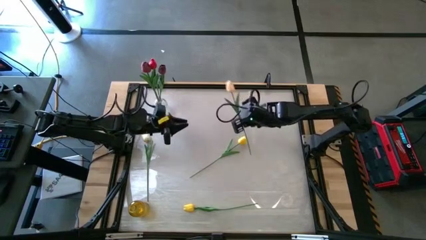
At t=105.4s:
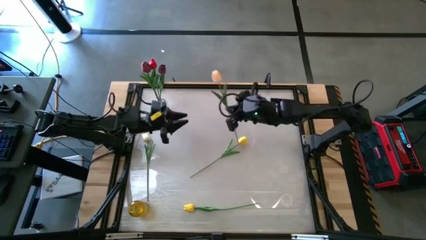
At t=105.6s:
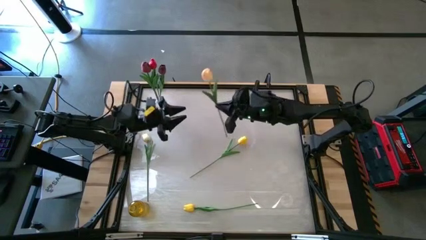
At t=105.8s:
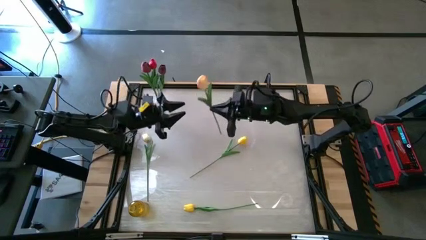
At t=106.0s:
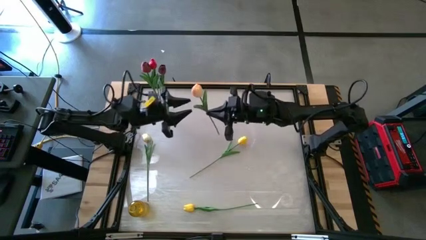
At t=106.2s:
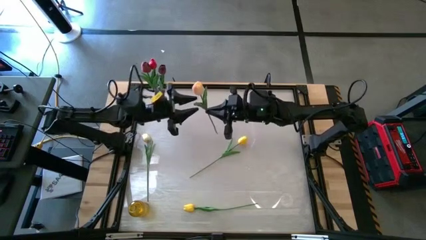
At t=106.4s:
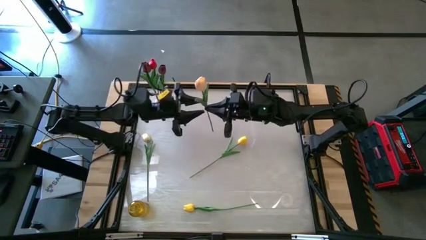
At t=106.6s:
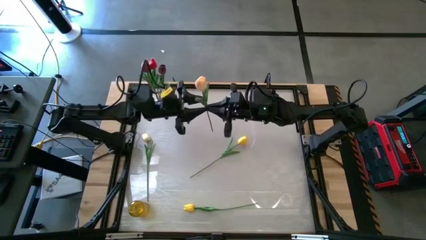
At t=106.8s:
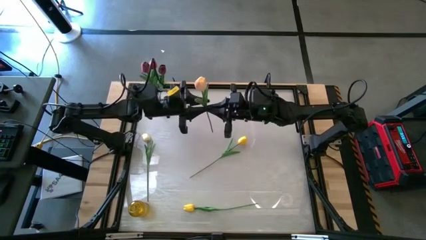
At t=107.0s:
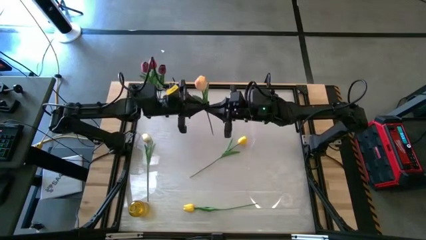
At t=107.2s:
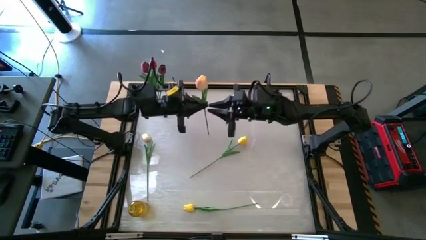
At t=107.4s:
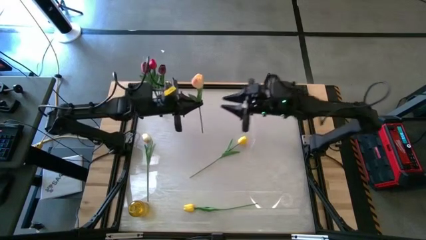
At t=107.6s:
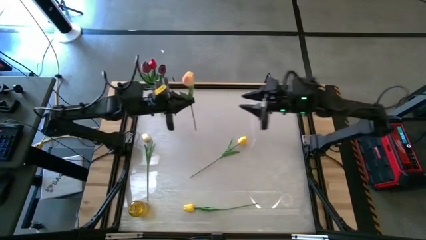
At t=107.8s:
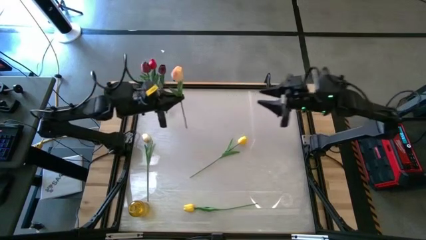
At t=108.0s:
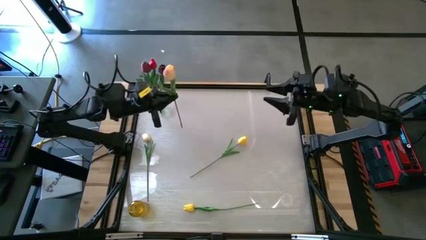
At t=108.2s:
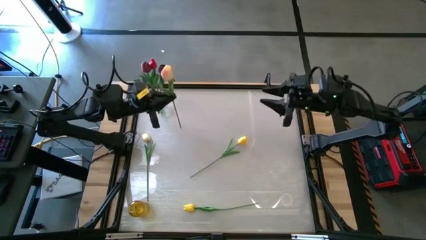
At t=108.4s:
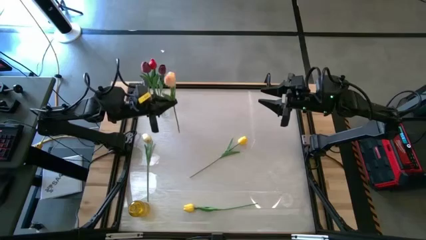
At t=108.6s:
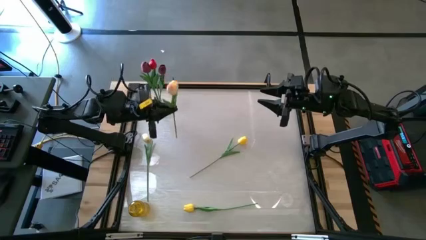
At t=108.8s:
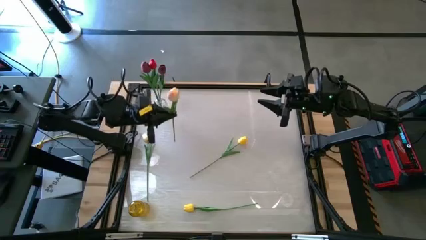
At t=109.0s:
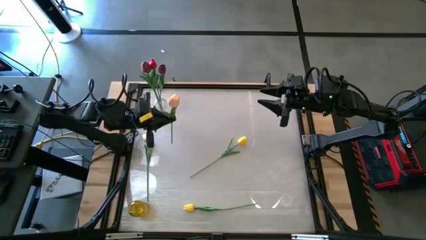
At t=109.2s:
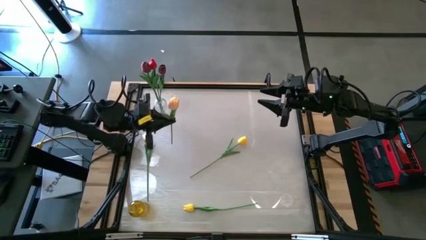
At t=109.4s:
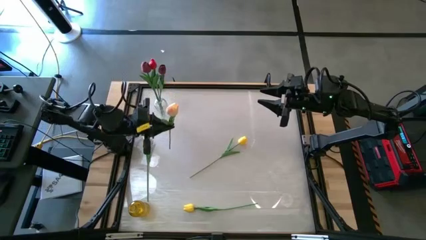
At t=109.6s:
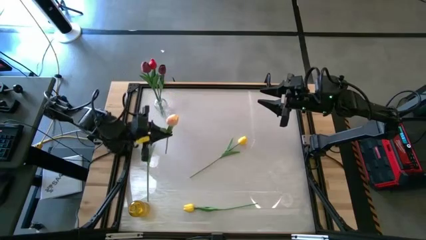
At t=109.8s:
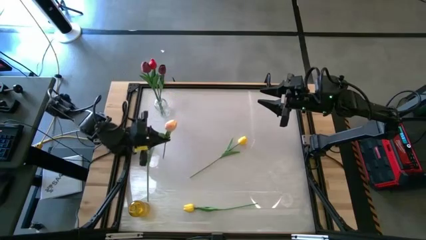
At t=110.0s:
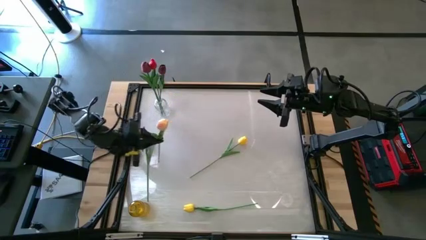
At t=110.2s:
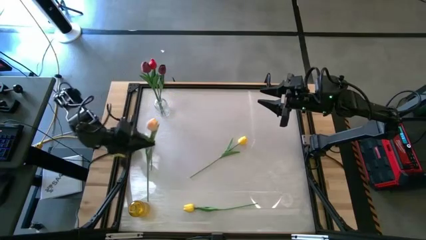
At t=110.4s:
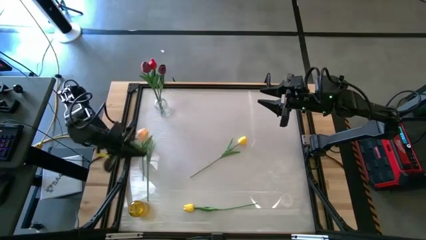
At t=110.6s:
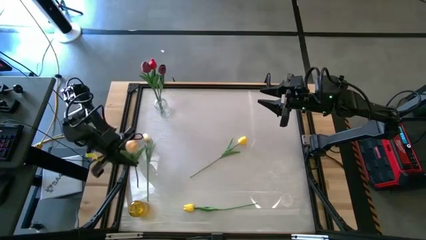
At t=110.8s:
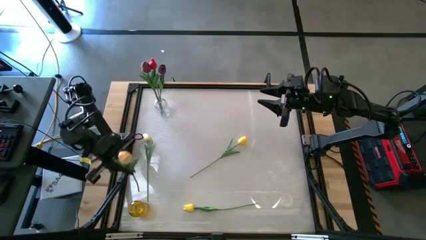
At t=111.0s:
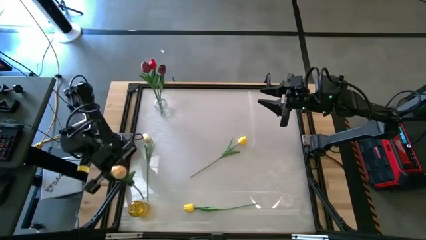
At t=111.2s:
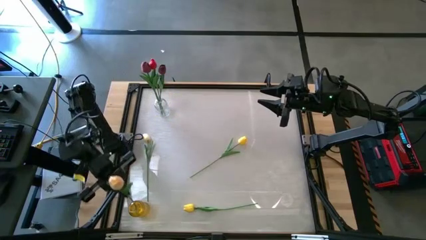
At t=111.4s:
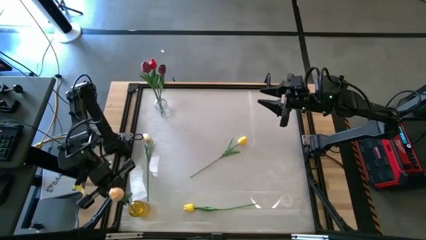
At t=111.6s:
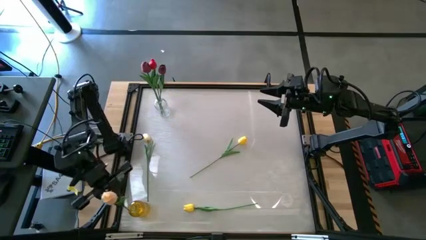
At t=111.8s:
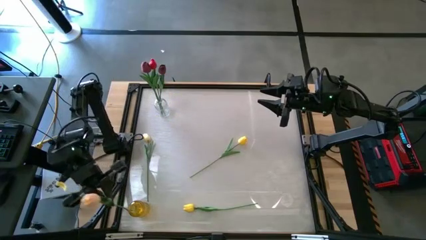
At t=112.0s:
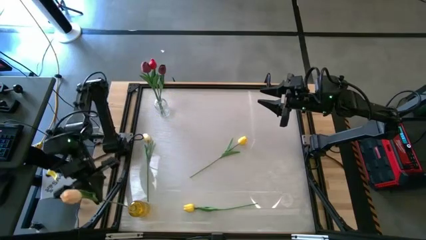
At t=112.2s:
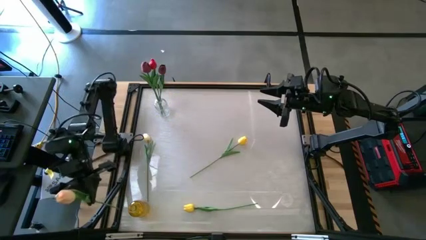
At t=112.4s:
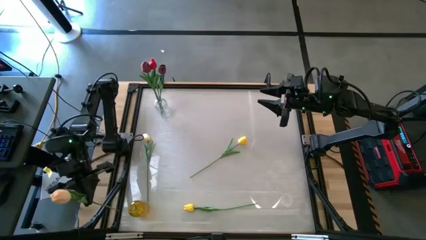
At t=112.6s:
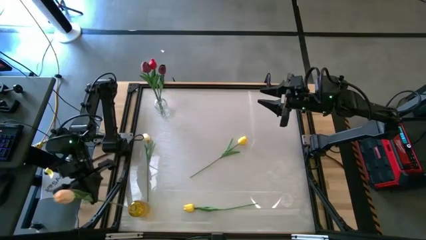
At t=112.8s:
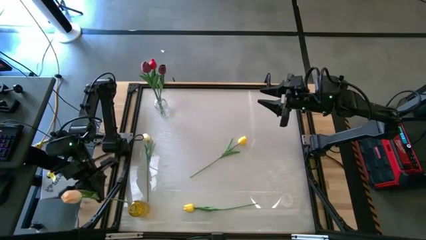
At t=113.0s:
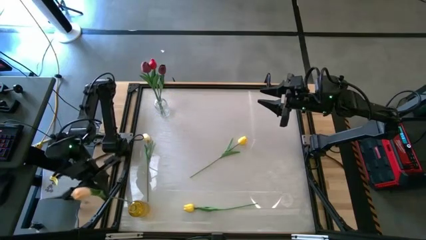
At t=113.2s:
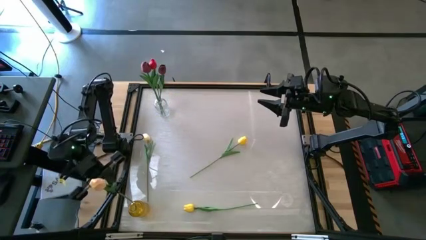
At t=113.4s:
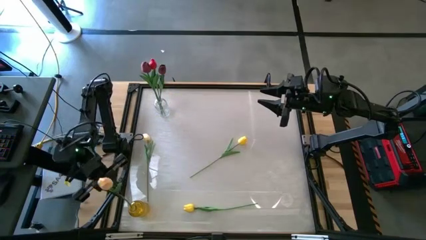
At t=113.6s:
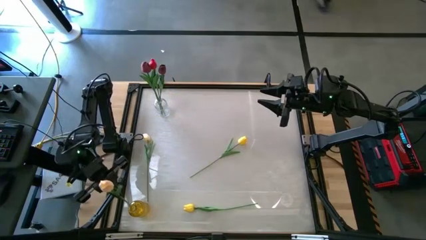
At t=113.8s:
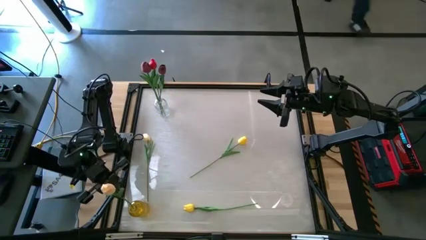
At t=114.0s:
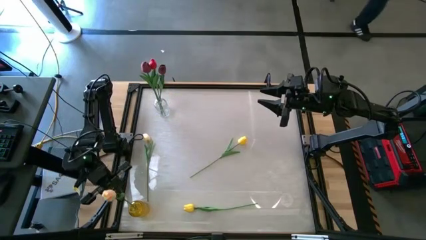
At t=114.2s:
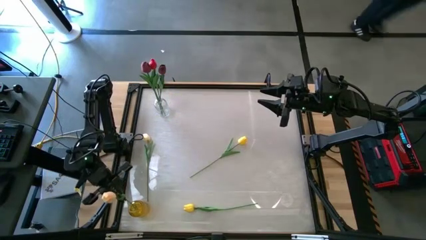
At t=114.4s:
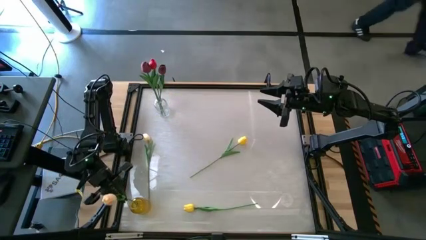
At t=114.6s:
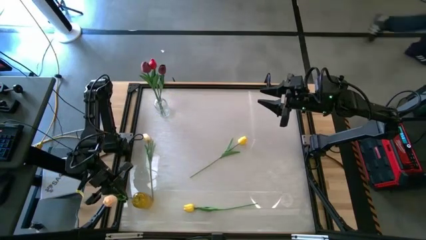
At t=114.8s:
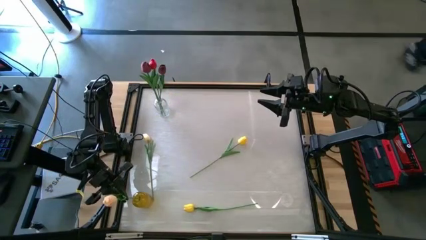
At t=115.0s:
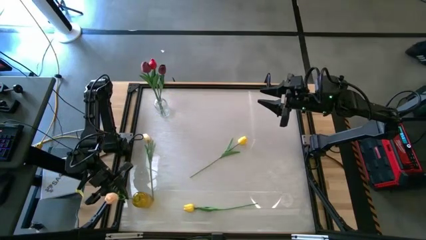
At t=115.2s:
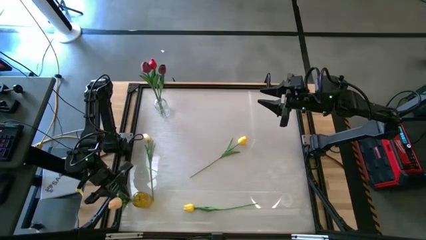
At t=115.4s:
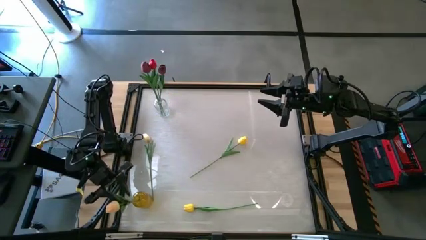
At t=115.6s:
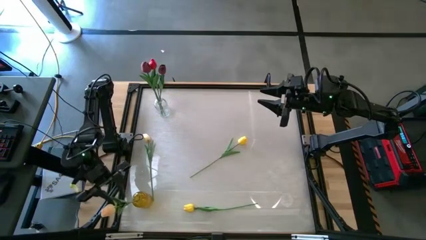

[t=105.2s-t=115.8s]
Task: Sort flowers into vase by color
Put the right white flower into the yellow vase

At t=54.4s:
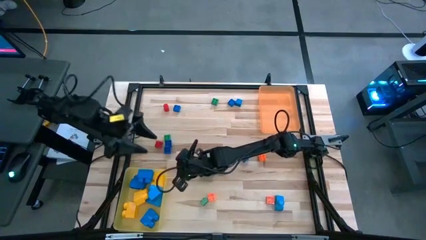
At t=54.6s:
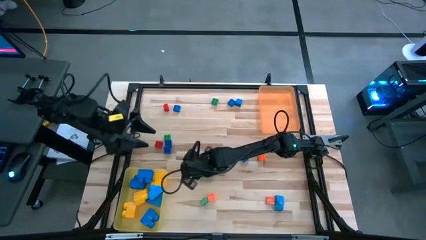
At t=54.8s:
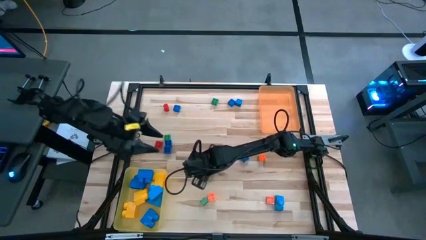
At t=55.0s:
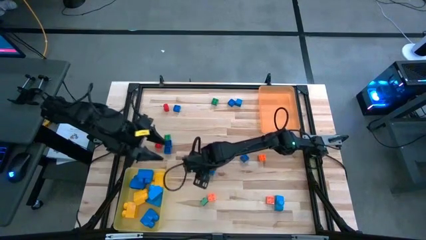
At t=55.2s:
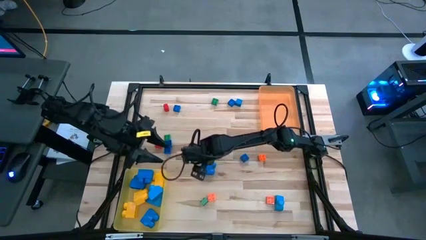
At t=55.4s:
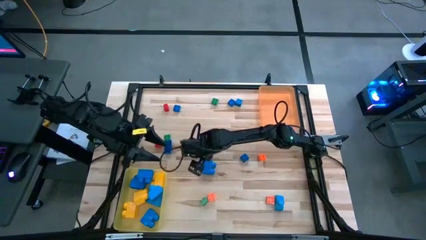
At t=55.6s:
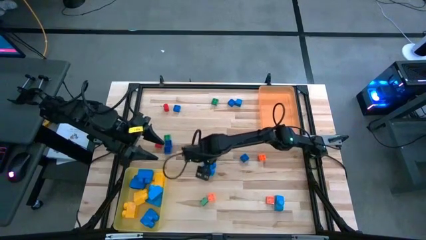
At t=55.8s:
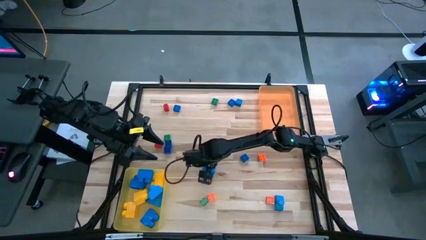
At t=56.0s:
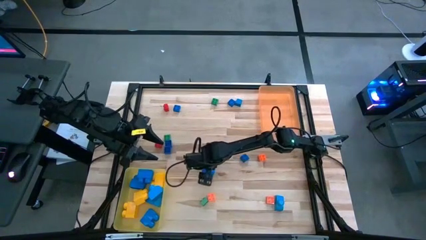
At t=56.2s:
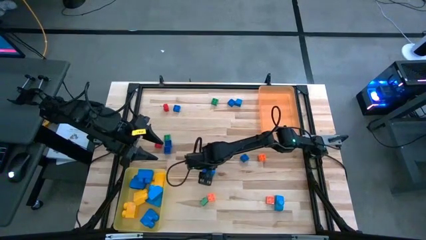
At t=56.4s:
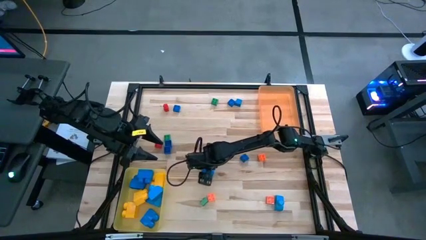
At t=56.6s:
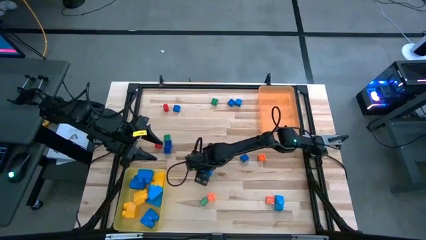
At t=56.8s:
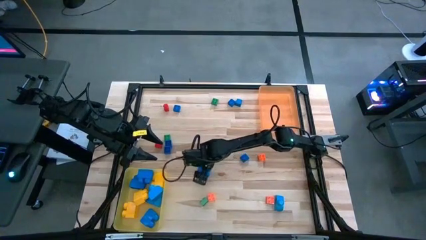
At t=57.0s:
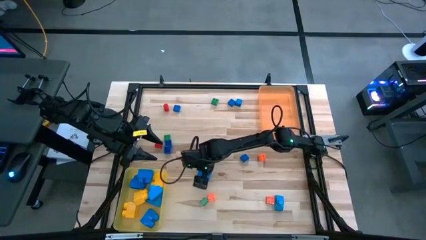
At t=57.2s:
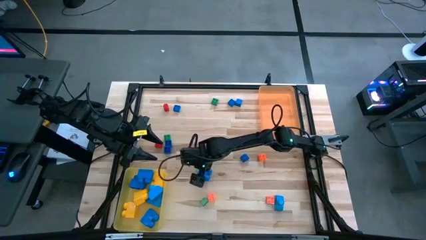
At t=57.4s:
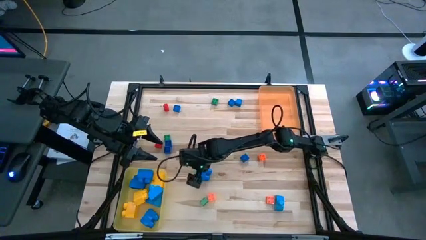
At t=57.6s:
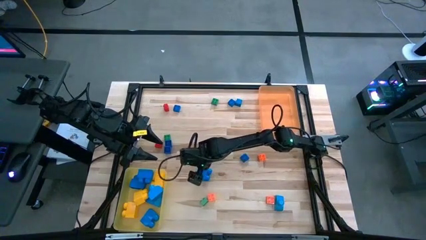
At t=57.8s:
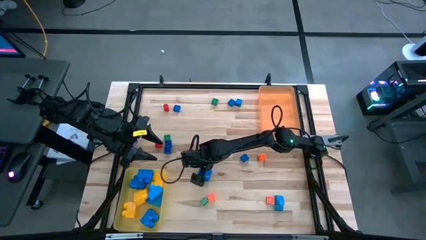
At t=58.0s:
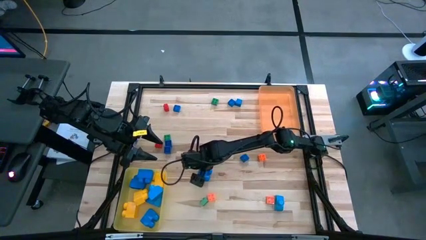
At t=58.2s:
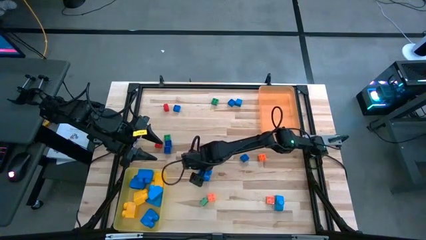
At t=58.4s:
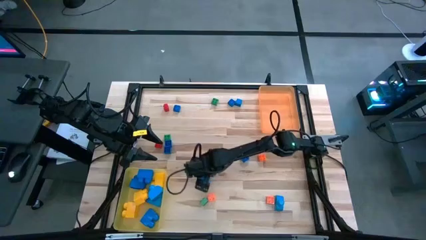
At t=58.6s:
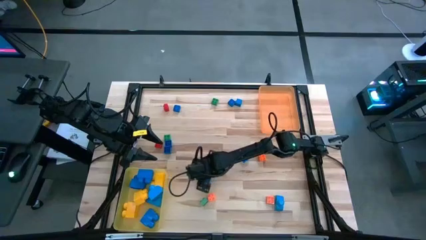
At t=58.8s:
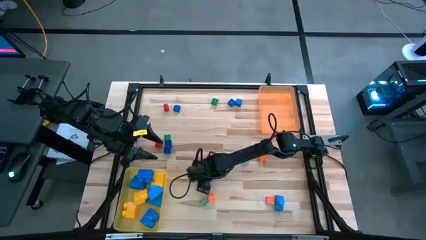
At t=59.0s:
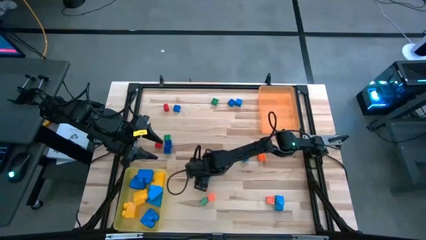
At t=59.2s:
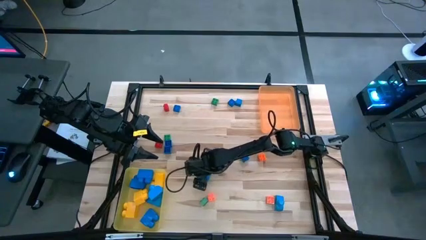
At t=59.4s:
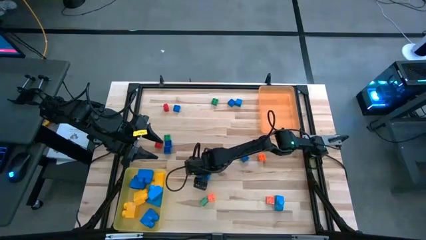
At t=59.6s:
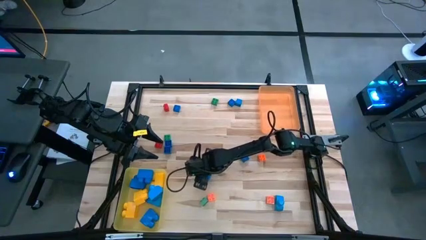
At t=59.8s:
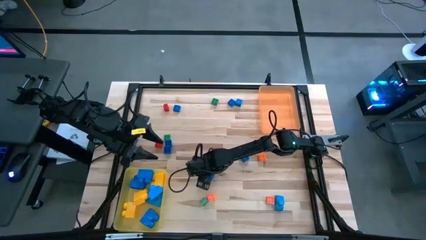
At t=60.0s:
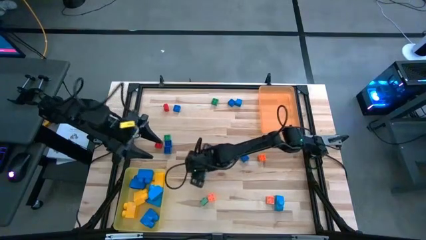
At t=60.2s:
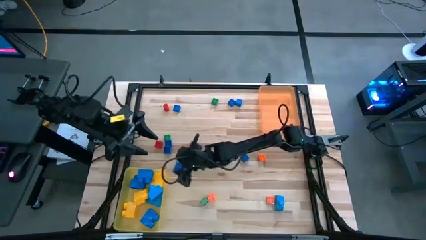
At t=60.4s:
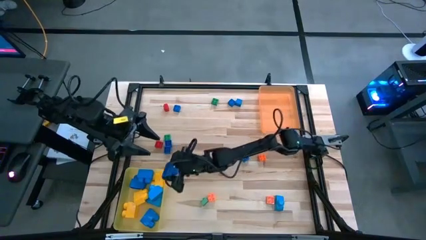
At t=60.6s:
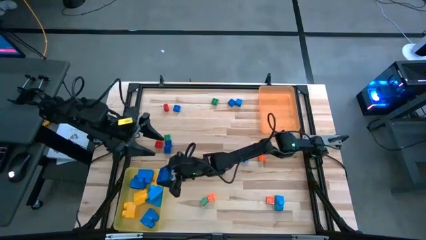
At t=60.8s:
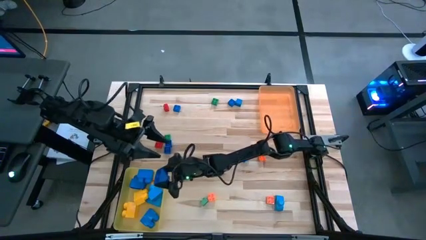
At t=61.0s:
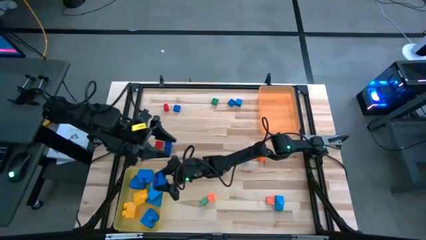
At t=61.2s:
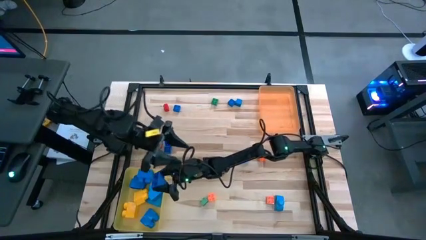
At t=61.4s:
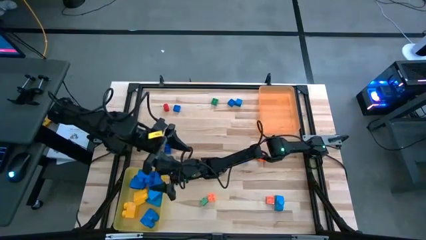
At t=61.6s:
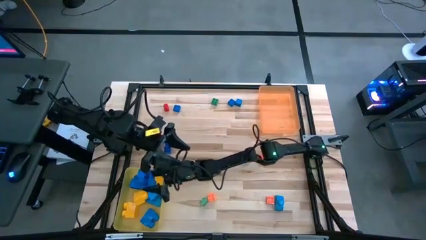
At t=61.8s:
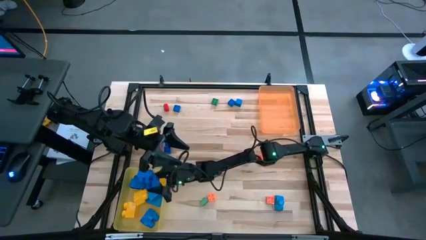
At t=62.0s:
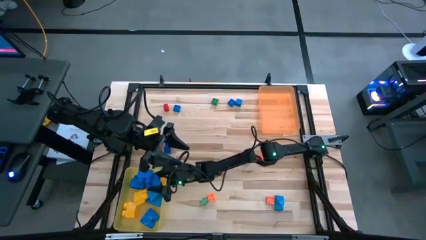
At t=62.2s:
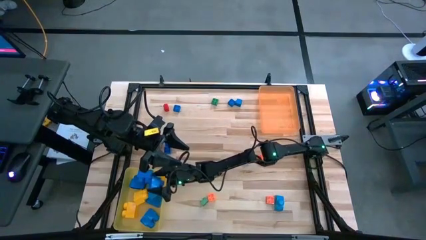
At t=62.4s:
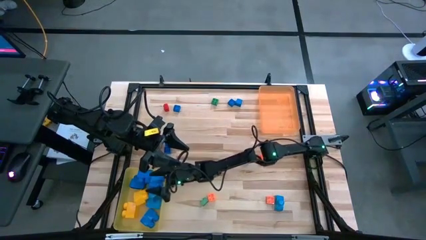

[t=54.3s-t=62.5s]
Task: Sort blocks by size
Put the large blue game piece into the yellow bin
